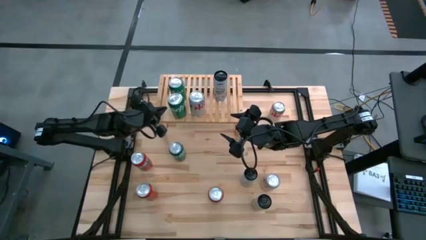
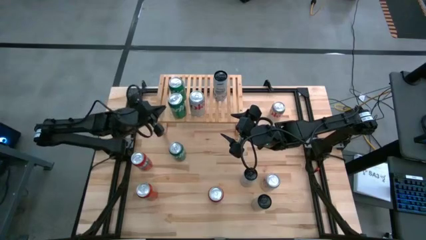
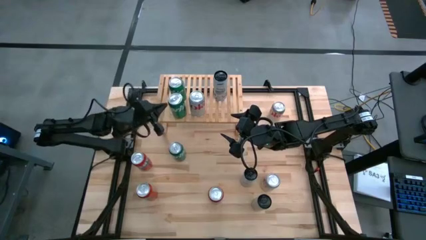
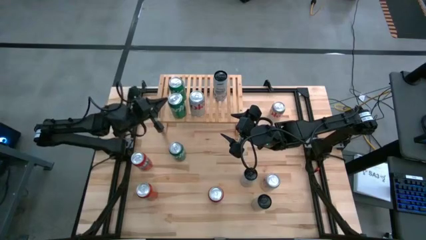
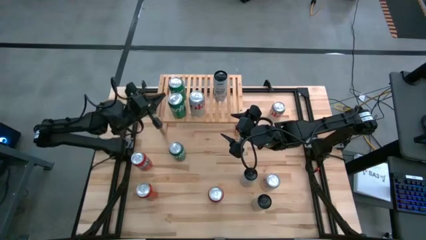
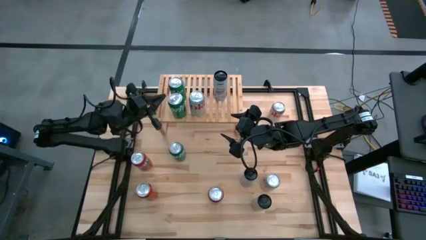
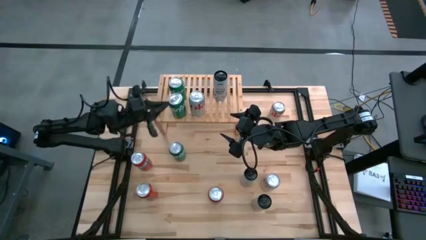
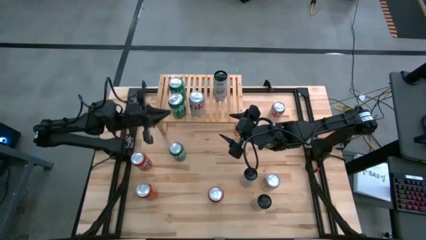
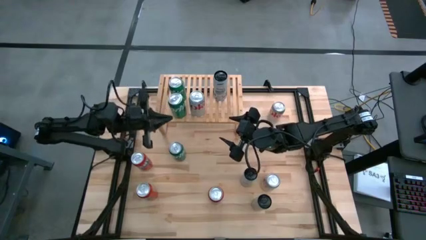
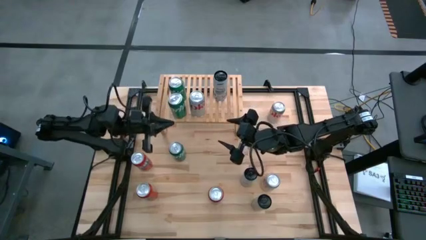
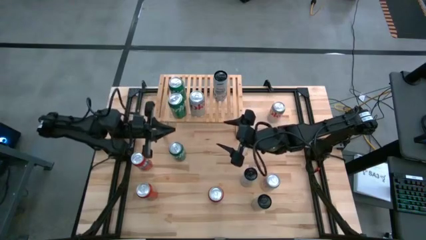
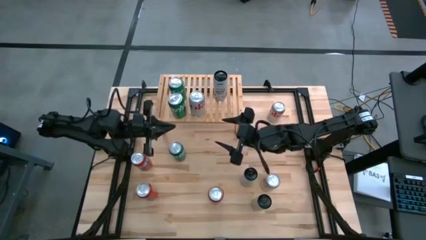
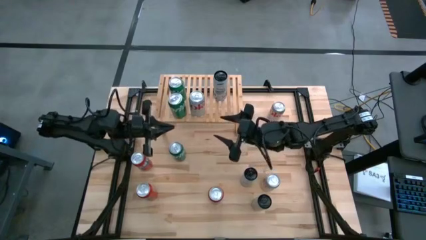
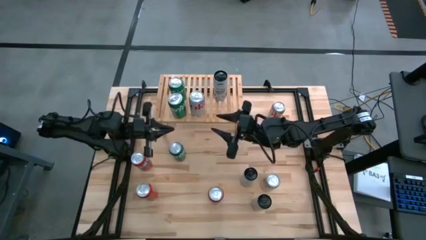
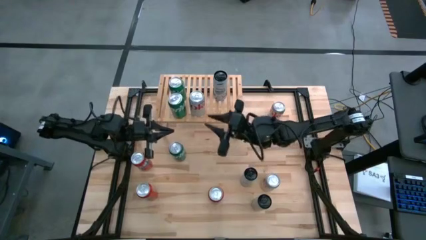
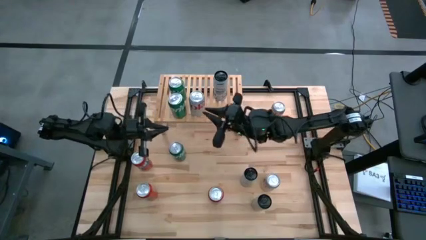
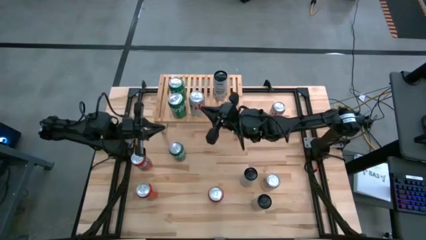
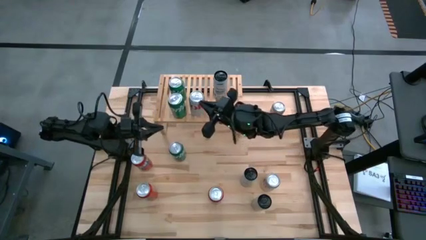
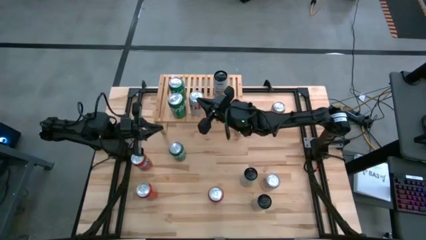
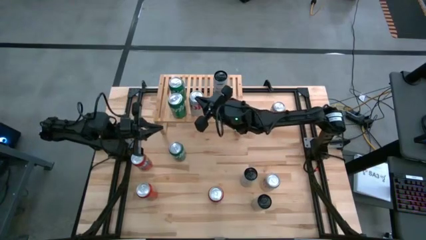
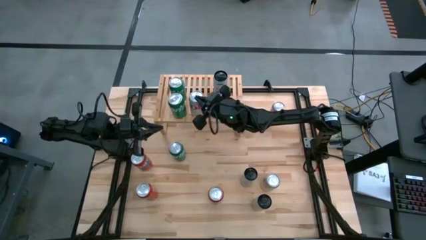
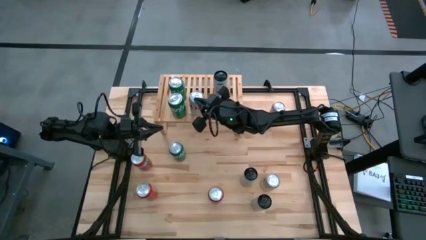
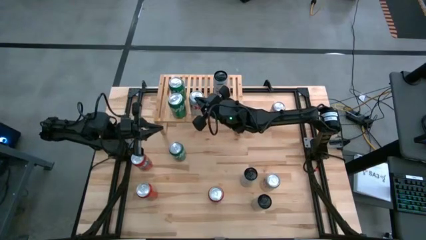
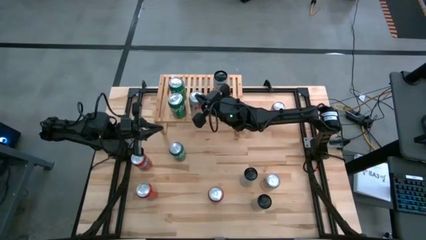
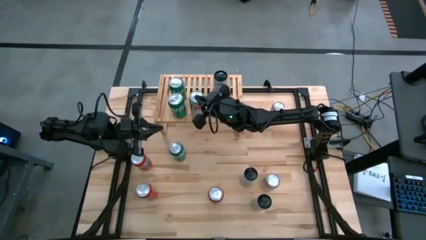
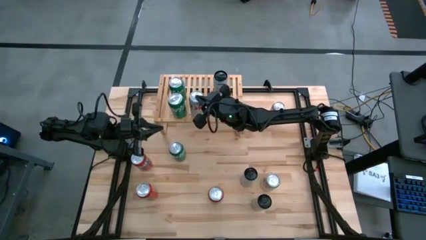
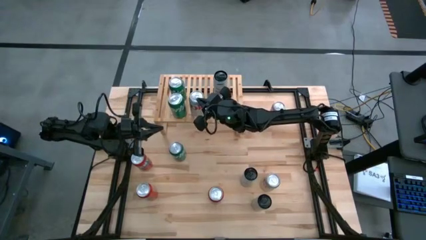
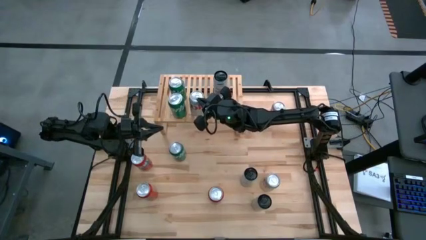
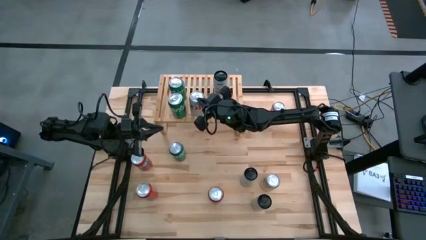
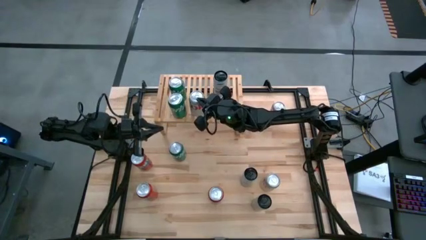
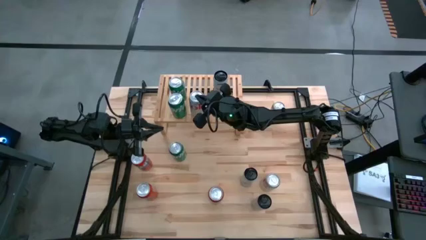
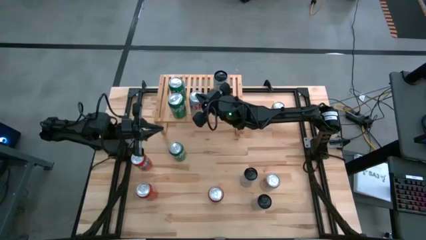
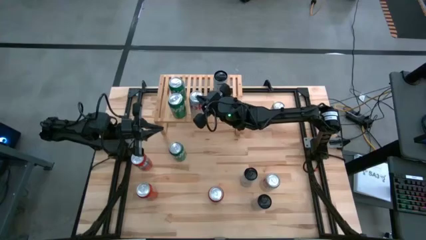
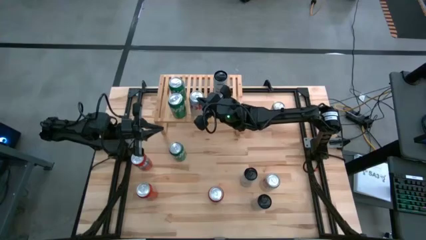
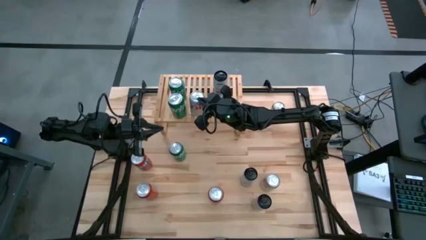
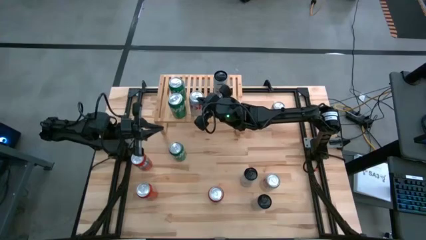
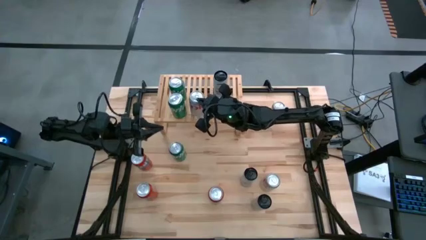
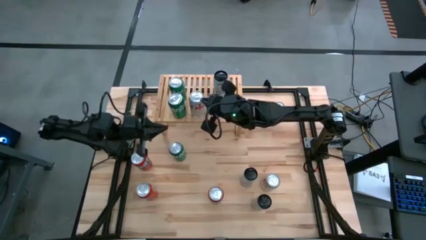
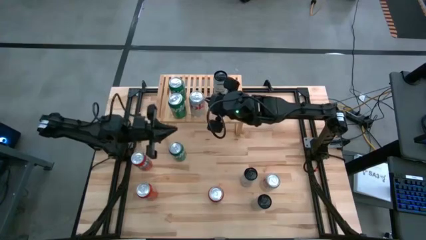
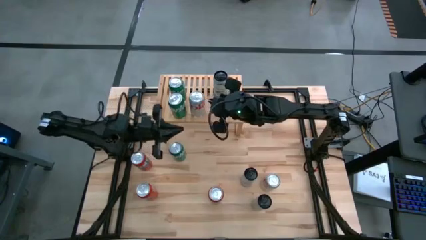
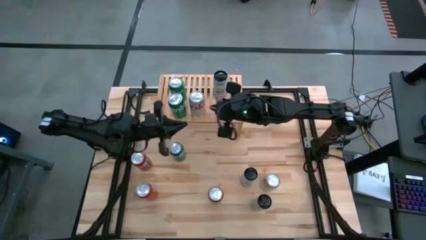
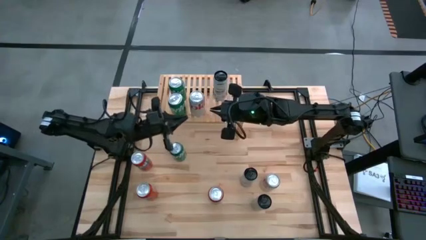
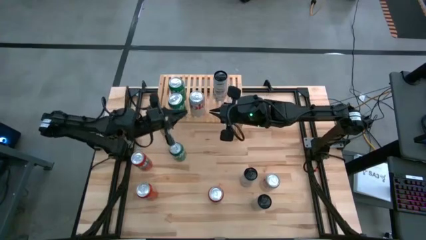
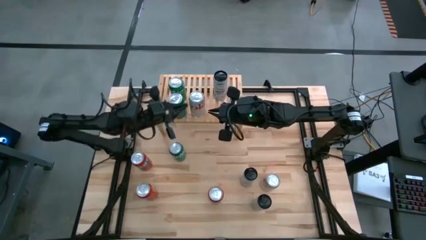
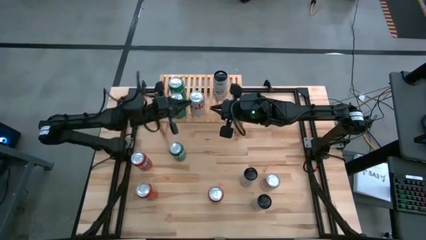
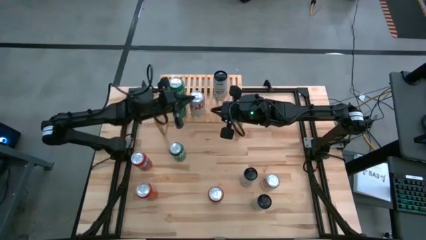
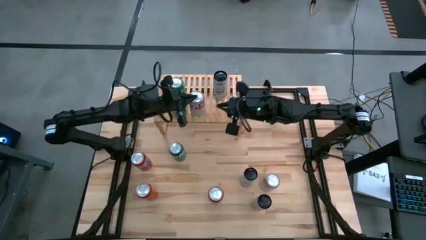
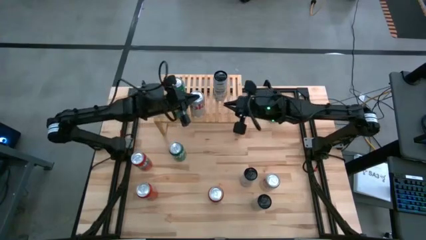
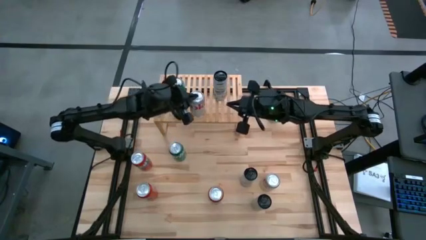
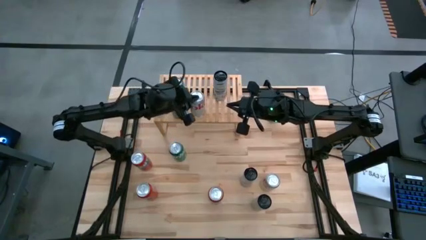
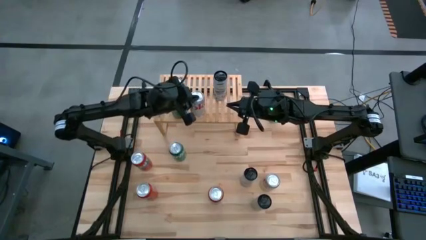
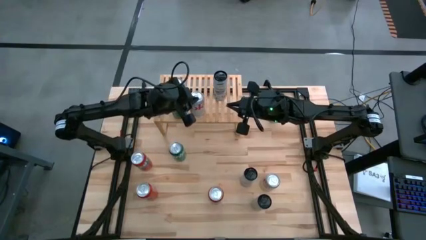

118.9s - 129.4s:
Task: Place canned beverage on shelf
Adjust the soda cans

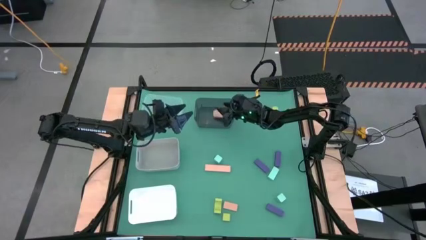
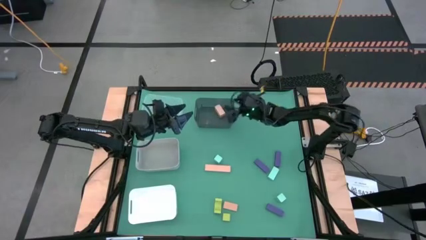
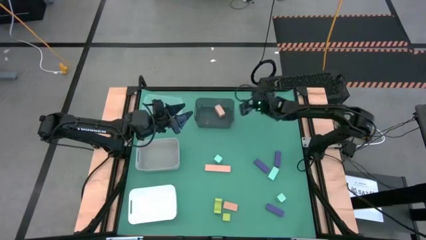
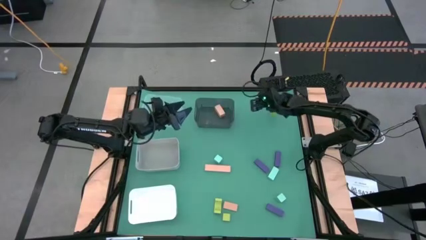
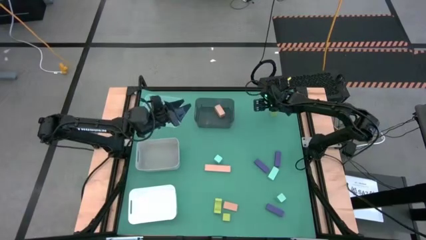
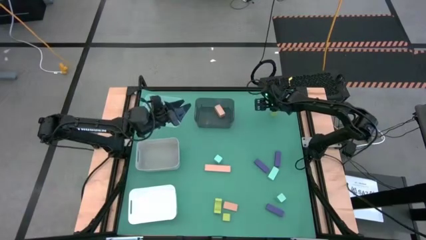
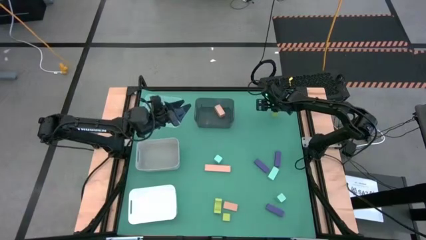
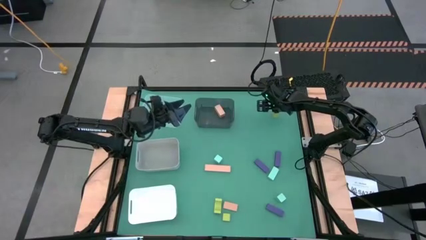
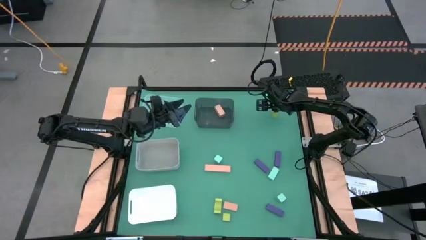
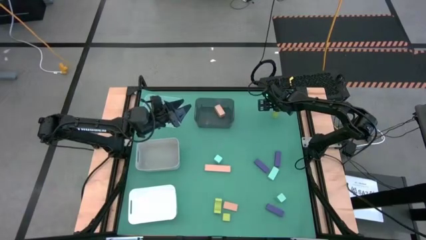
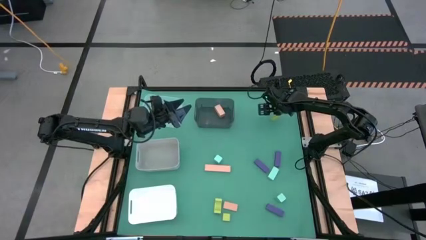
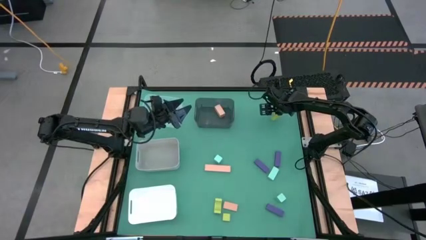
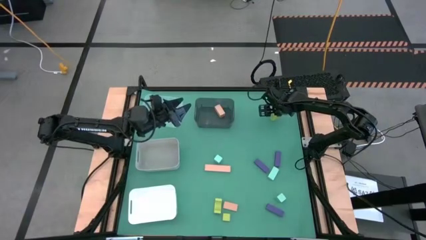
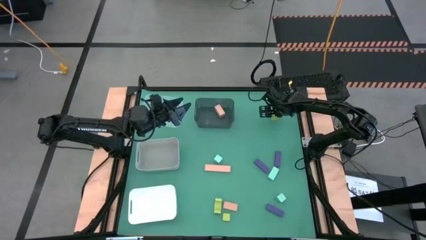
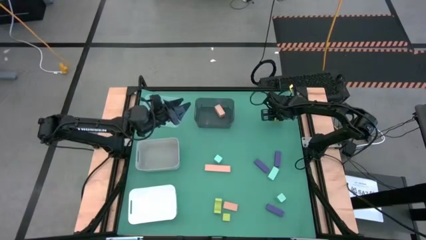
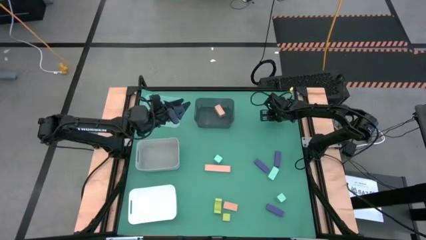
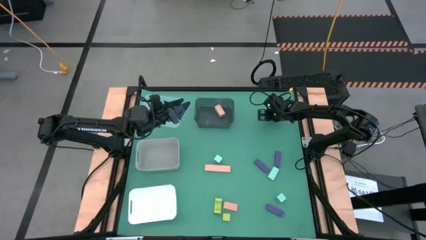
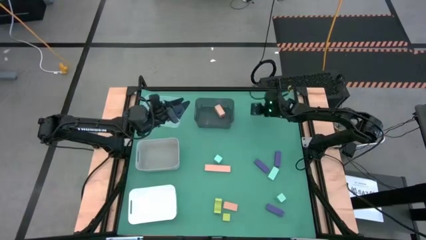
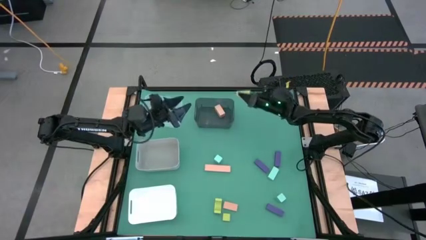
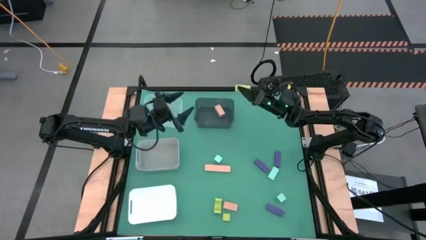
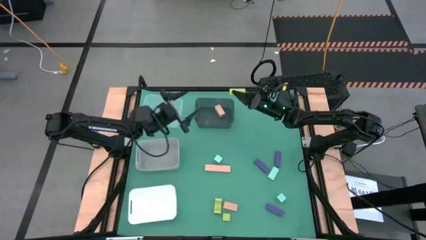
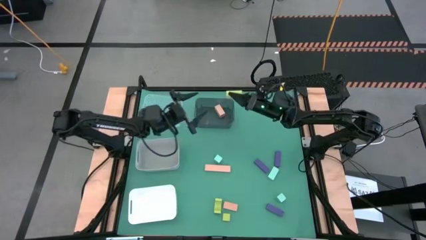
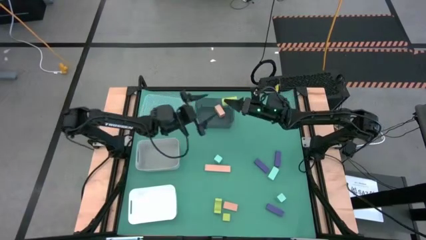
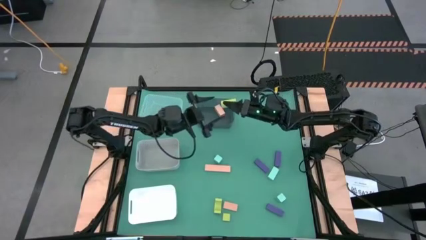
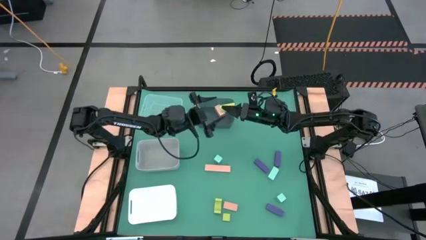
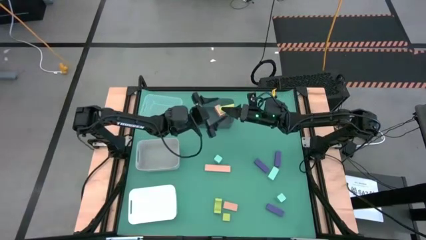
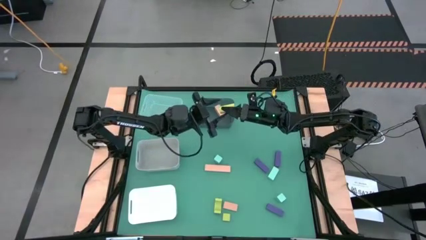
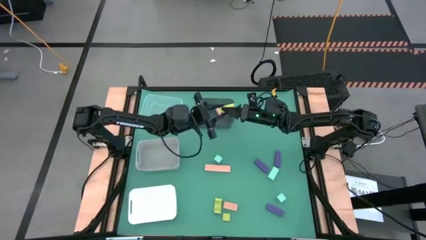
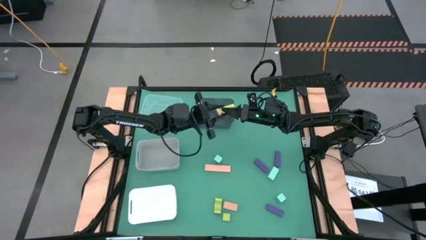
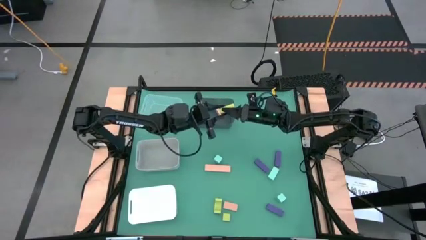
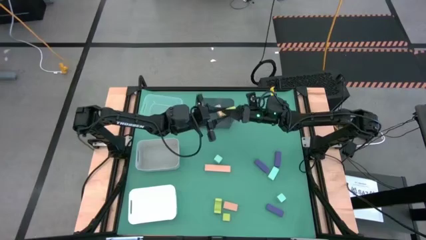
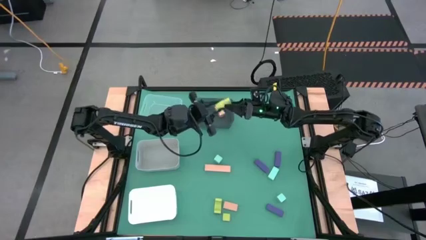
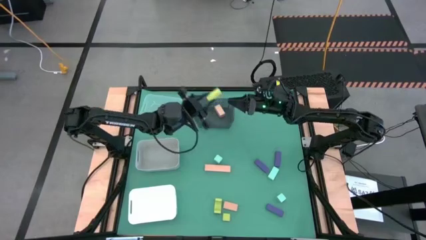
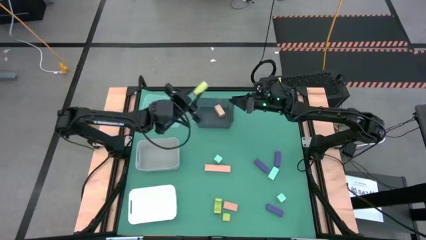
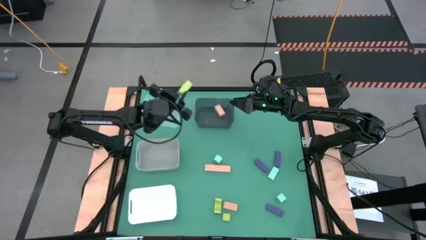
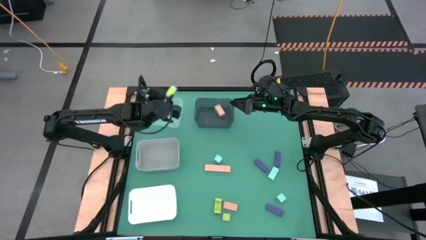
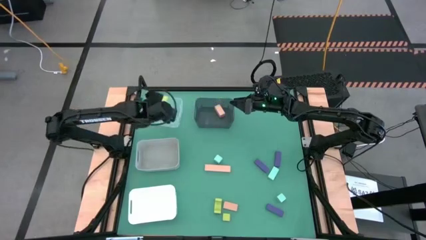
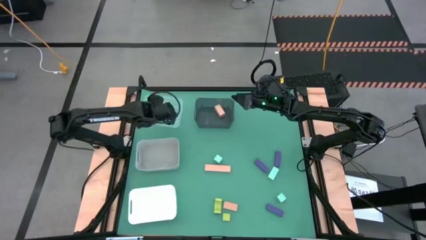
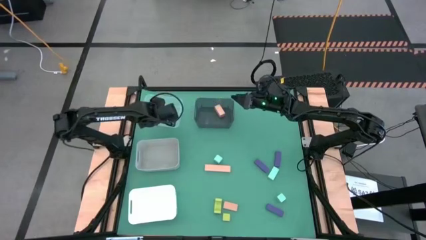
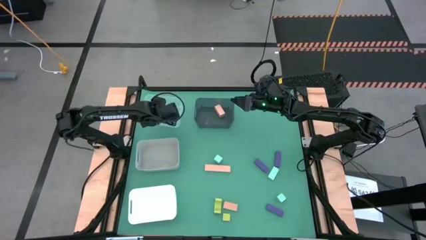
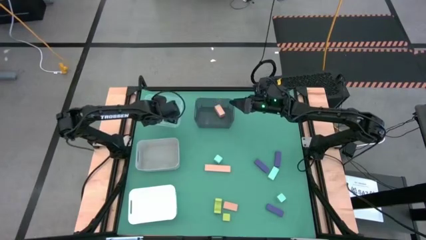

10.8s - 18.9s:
Task: Sort & place blocks by color
Put the top right green block into the transparent bin
